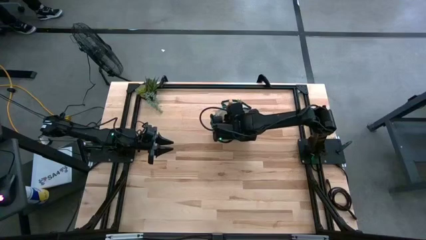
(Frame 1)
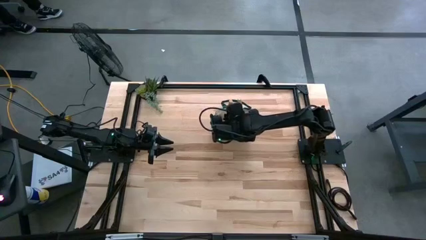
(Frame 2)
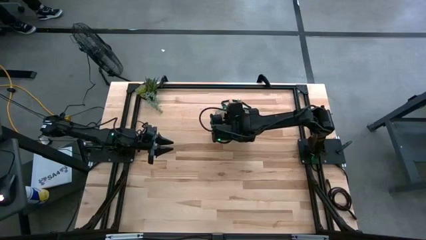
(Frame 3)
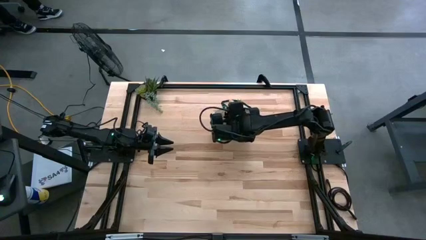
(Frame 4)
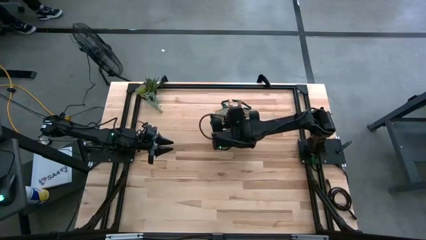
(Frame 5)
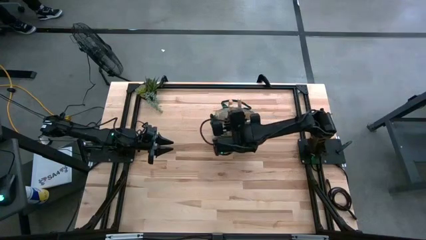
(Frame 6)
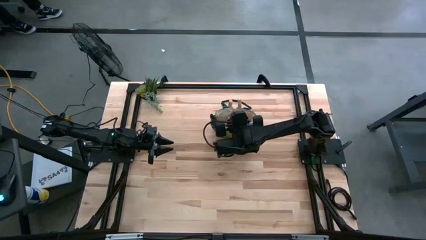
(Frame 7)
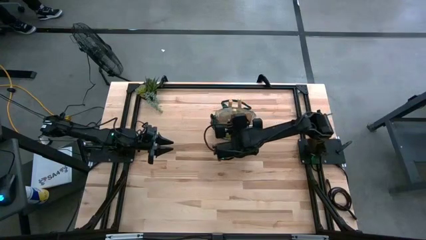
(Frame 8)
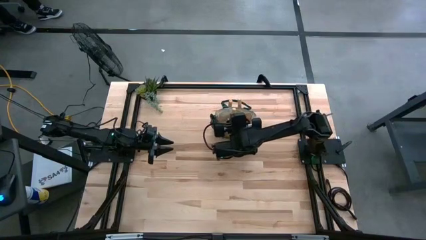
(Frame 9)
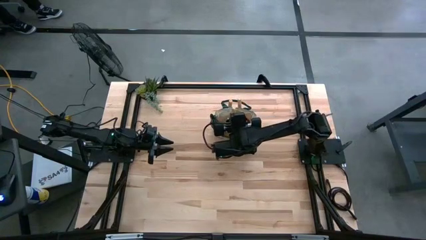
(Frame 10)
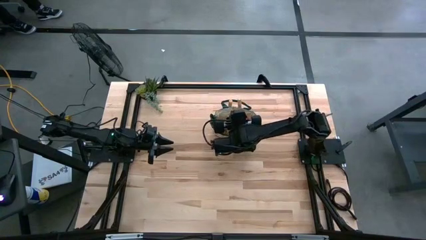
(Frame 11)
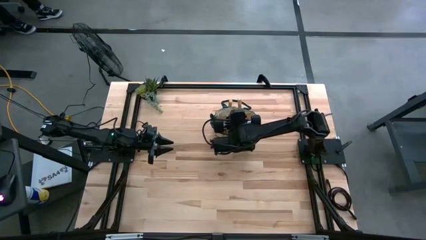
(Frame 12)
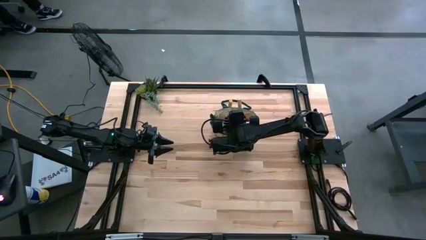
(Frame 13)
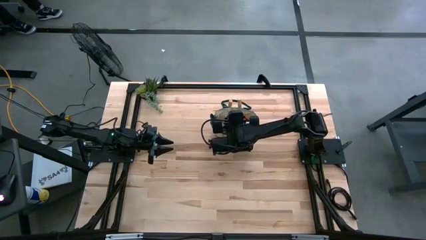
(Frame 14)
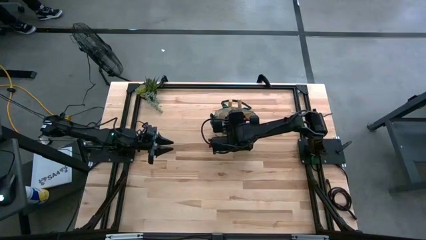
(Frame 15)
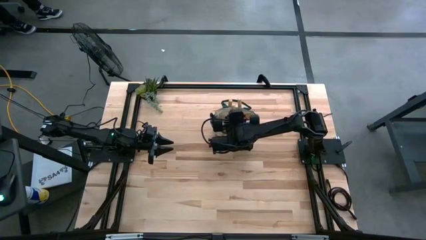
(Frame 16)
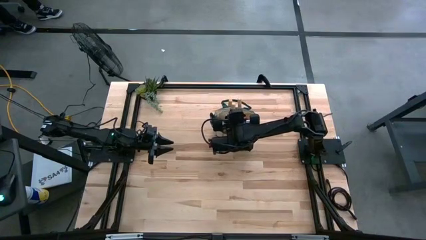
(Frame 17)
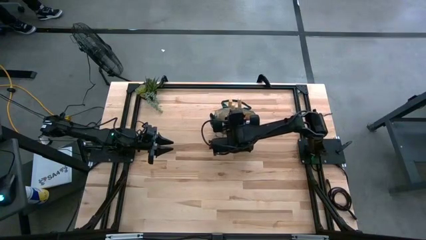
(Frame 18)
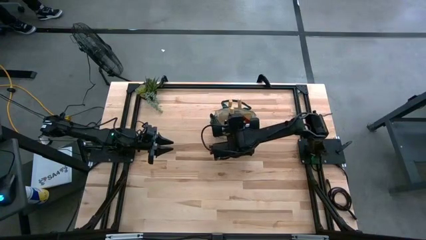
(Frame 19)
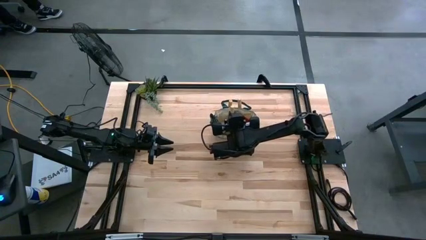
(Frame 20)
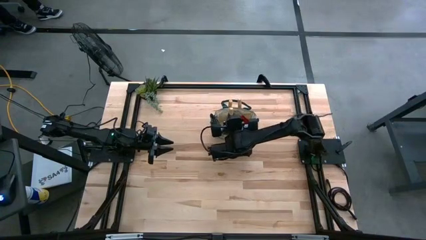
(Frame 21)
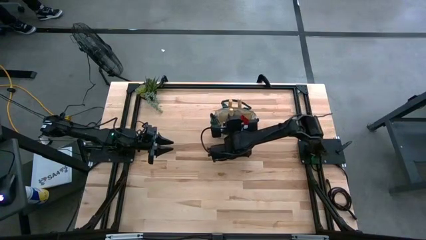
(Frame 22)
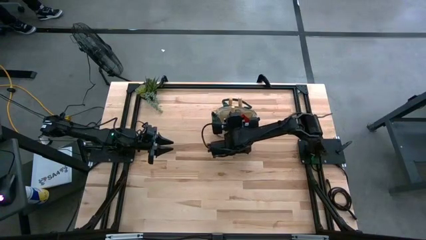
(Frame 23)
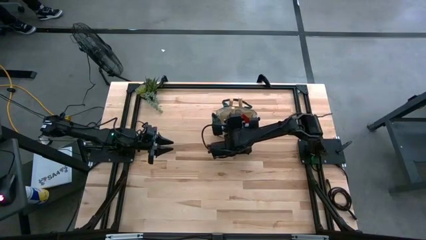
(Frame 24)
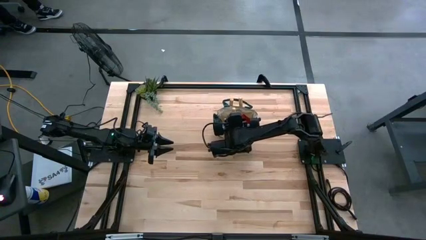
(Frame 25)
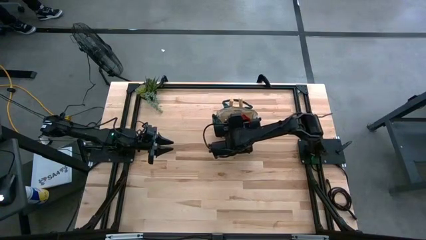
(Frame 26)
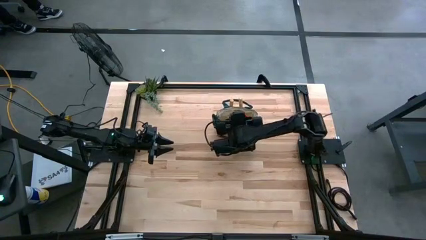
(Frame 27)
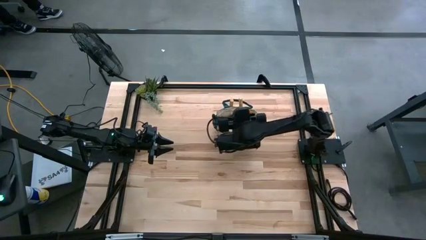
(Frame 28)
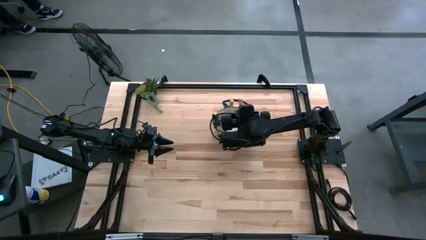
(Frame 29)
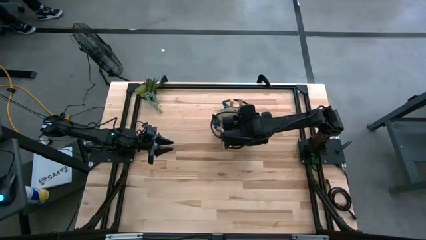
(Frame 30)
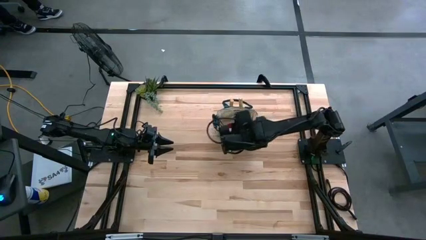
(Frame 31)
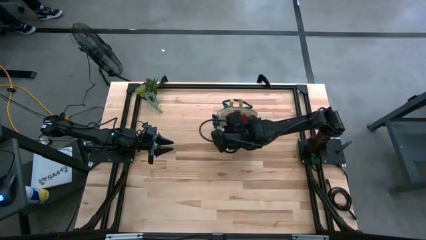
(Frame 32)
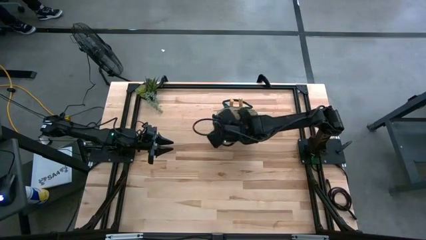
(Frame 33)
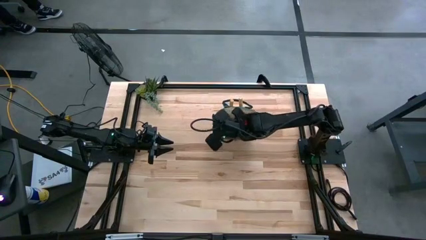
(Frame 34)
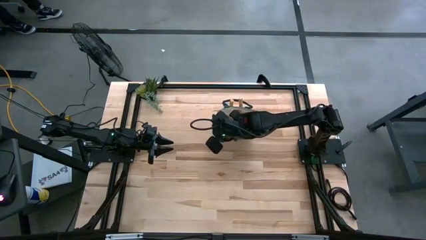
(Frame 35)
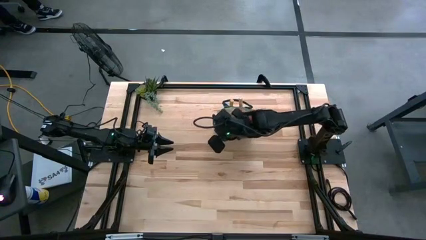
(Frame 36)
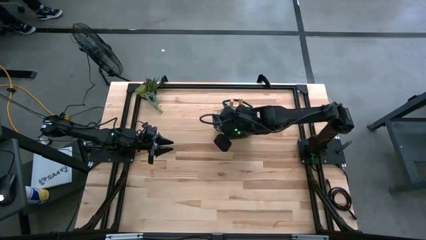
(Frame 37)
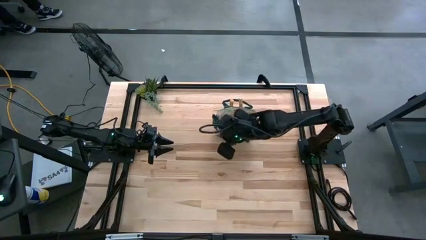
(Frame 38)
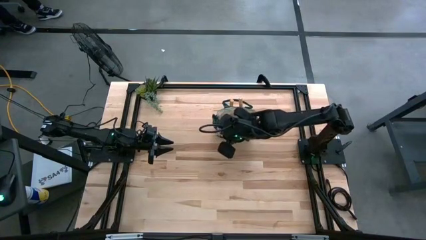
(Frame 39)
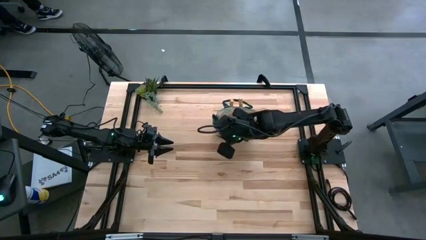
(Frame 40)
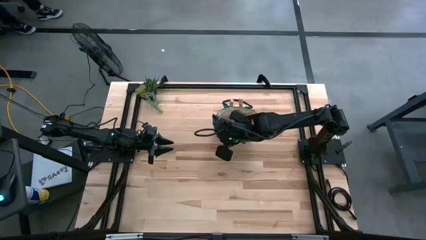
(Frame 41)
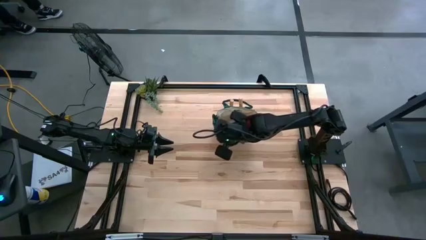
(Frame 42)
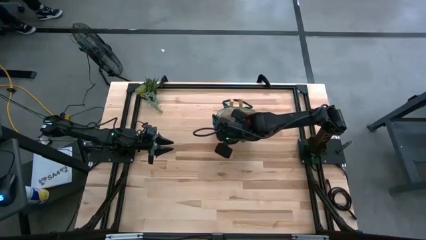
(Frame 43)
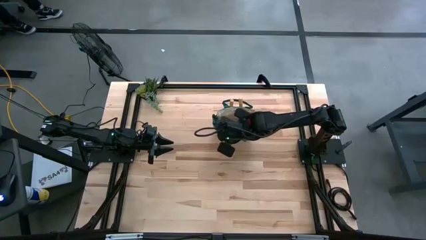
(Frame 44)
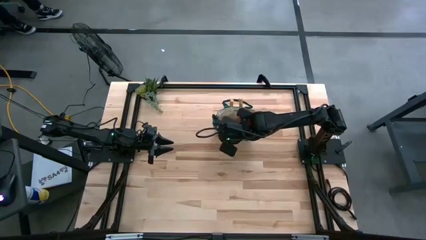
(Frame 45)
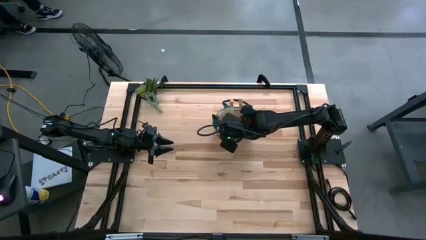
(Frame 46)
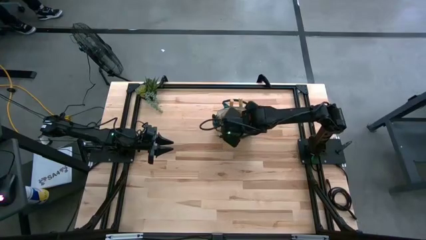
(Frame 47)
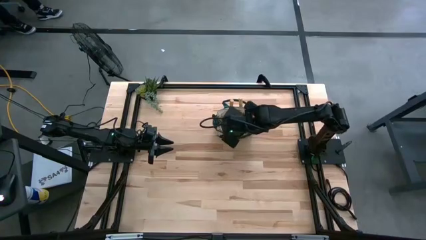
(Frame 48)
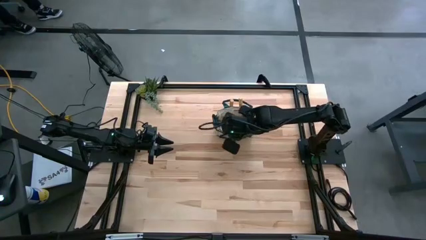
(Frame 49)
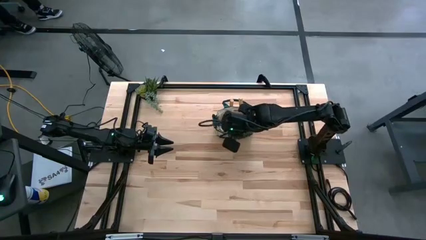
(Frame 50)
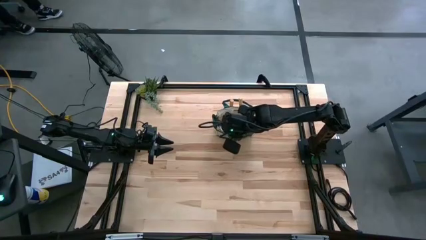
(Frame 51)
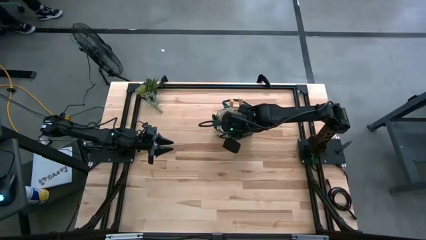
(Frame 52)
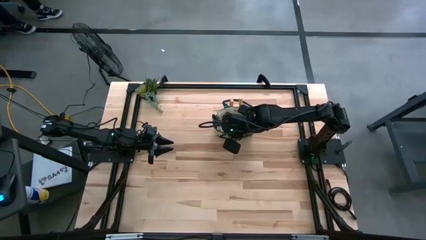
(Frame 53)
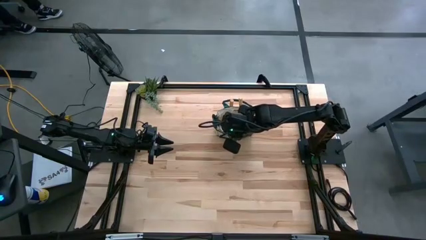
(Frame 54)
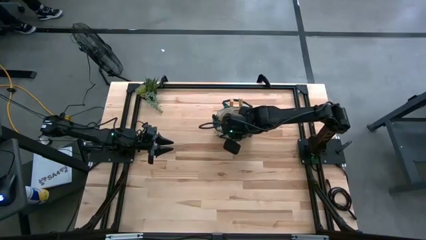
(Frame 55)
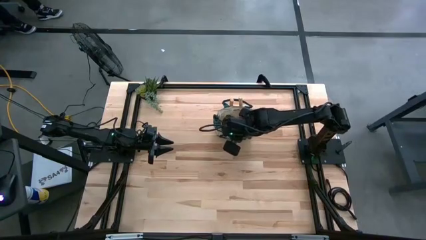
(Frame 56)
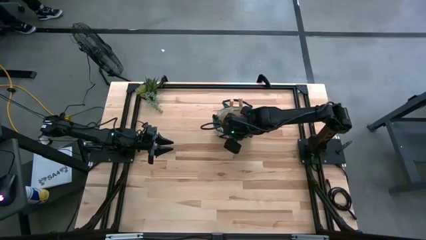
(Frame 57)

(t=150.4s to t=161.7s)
Task: Pick & Place Garden tools in Gardening bag
Put the brown hand rake into the white gardening bag

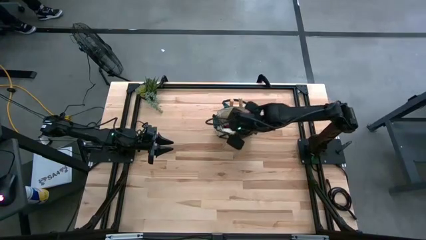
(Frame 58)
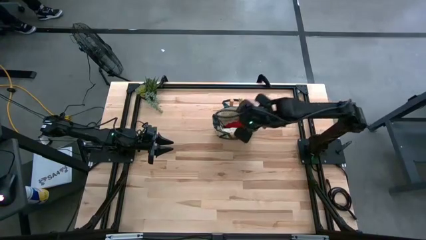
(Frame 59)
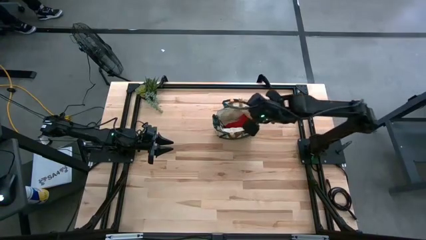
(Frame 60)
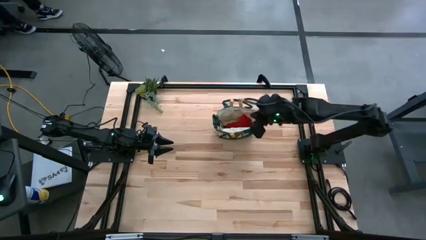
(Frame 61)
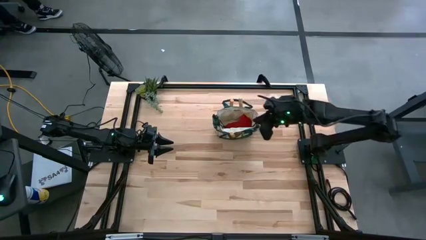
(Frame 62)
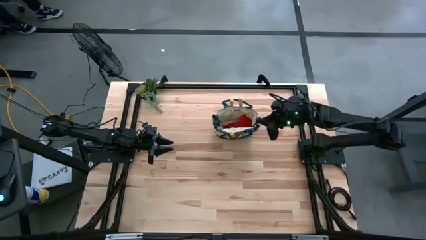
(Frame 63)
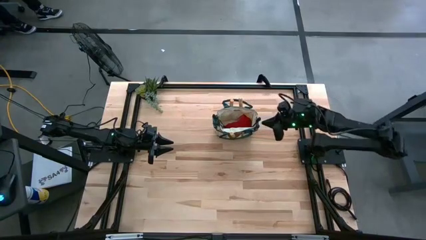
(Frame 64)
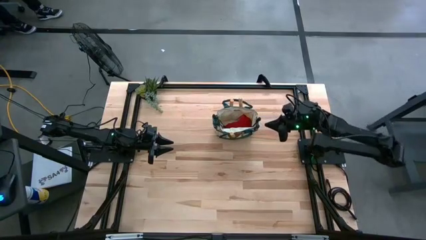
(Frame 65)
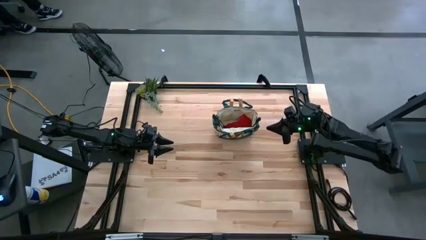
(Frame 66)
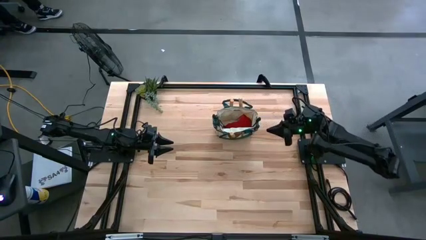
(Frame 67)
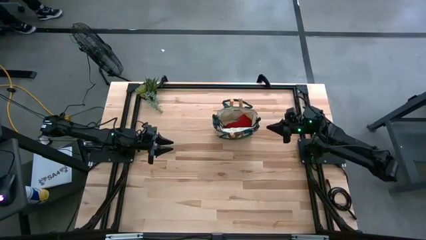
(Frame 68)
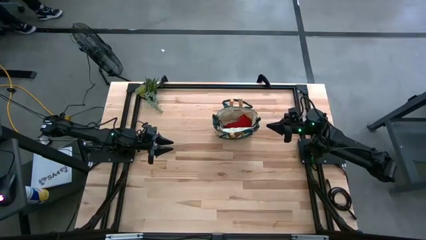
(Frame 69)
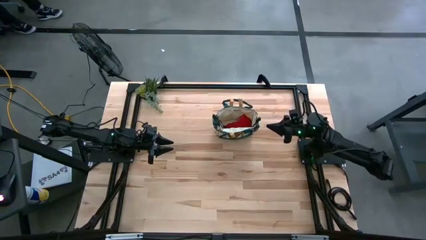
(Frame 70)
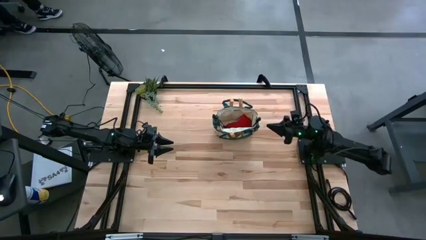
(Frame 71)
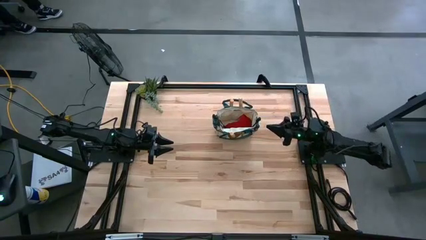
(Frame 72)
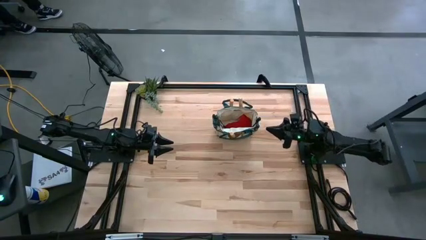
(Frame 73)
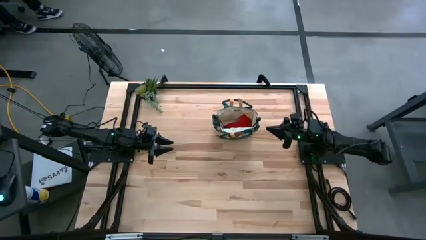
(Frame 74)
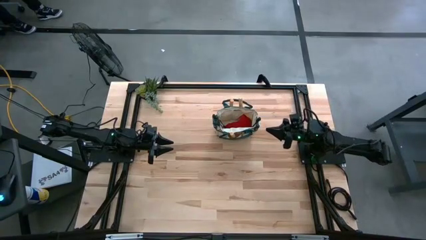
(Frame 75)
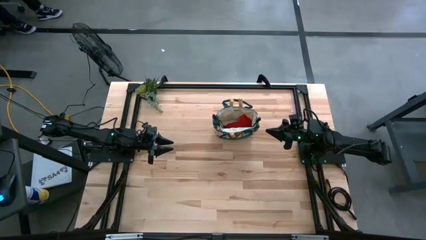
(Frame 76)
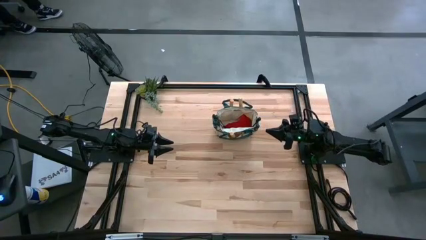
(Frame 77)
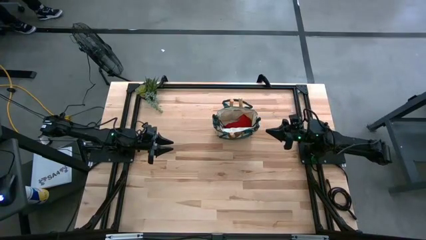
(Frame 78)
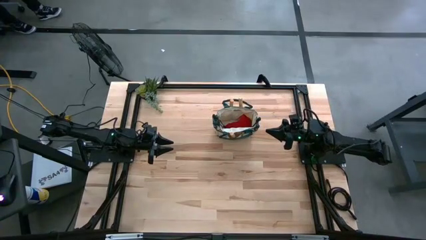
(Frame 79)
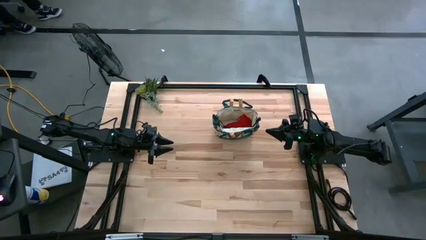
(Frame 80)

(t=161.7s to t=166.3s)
Return to Home Position
